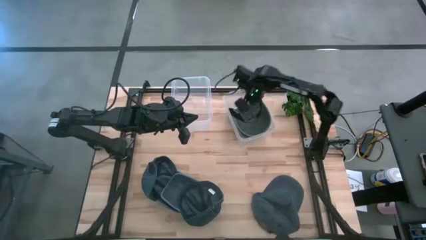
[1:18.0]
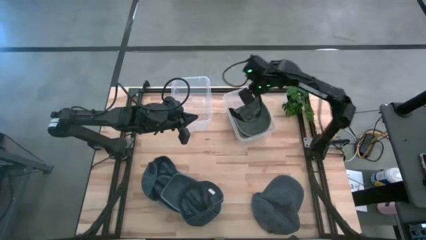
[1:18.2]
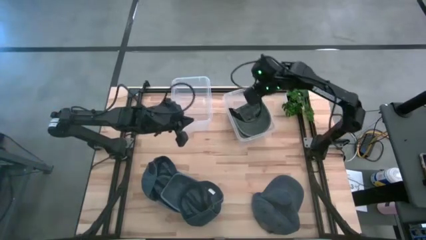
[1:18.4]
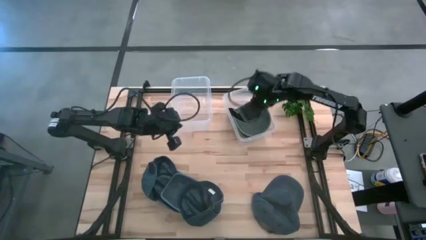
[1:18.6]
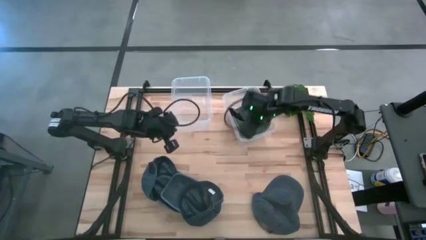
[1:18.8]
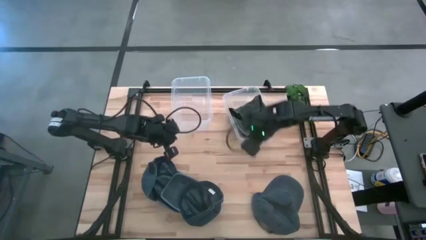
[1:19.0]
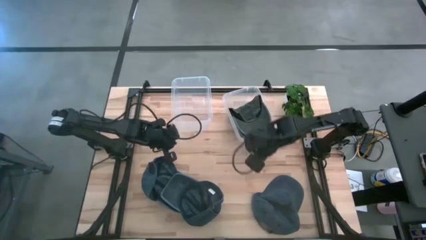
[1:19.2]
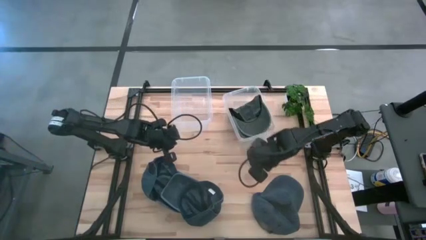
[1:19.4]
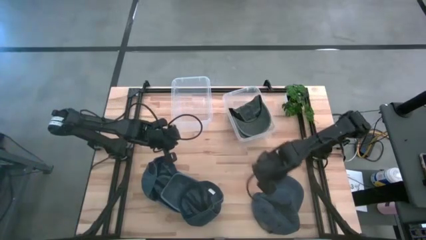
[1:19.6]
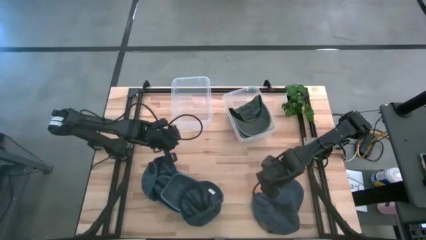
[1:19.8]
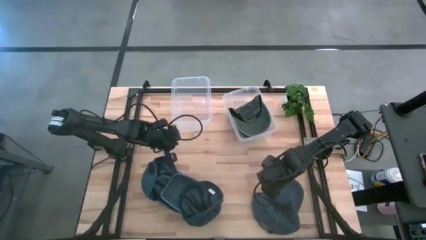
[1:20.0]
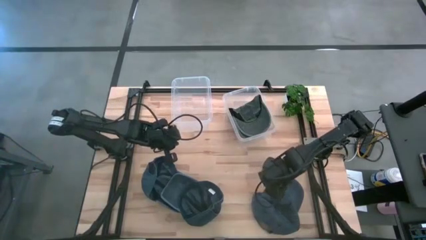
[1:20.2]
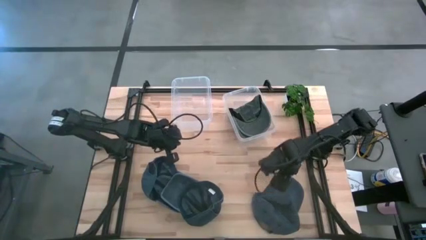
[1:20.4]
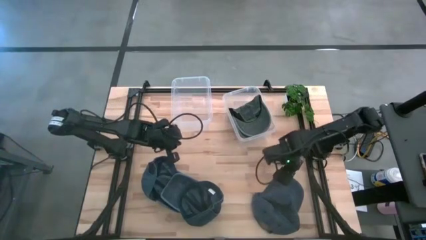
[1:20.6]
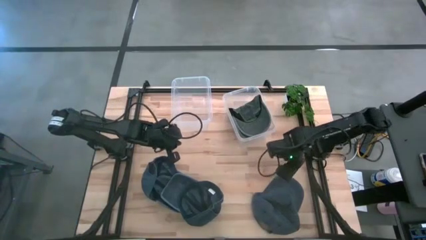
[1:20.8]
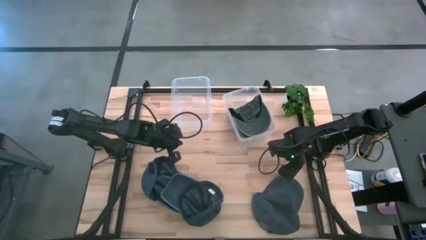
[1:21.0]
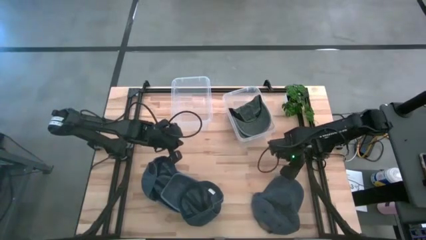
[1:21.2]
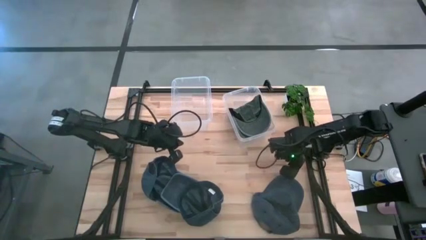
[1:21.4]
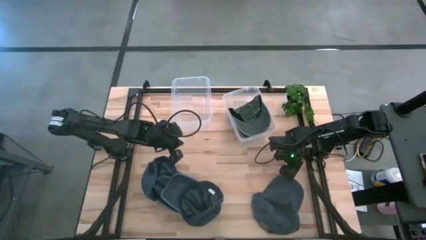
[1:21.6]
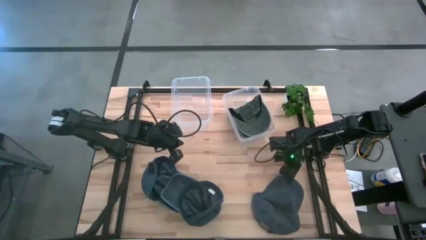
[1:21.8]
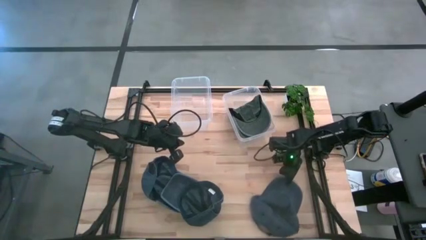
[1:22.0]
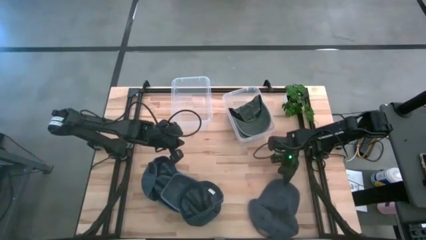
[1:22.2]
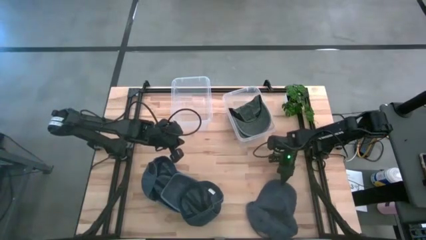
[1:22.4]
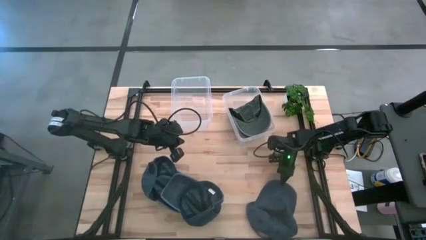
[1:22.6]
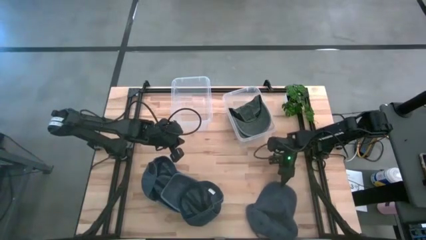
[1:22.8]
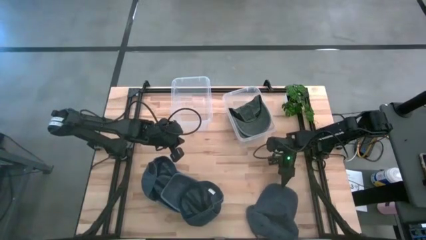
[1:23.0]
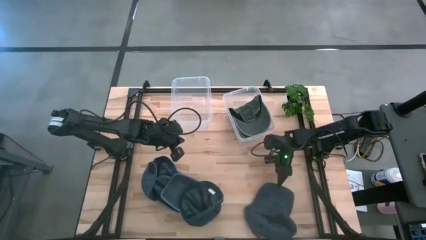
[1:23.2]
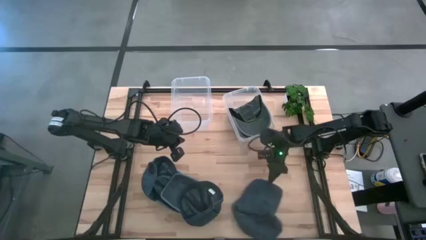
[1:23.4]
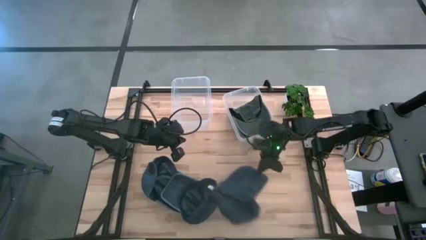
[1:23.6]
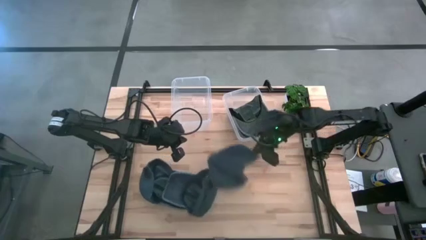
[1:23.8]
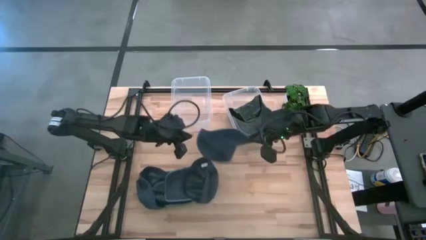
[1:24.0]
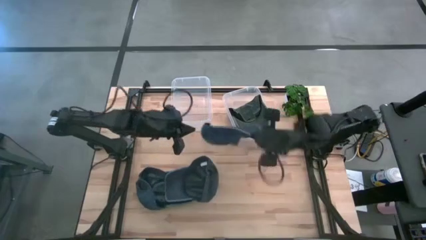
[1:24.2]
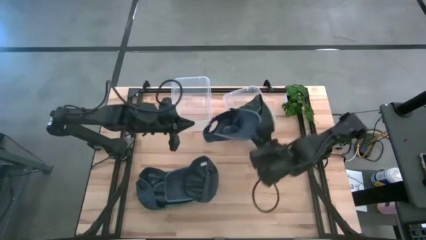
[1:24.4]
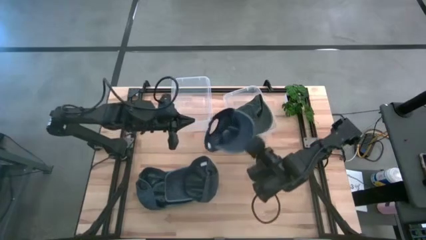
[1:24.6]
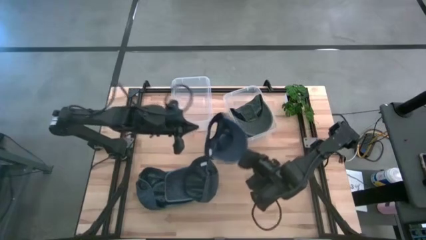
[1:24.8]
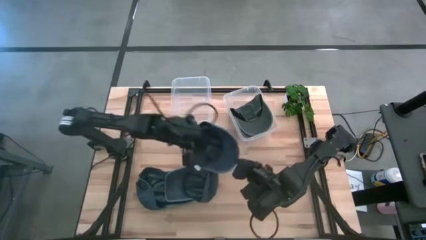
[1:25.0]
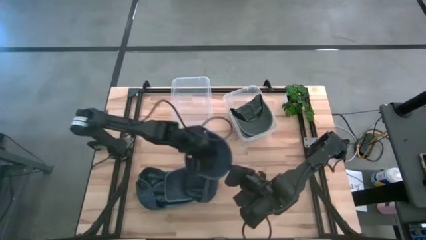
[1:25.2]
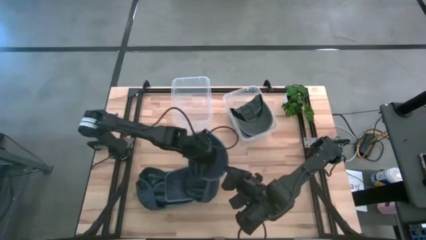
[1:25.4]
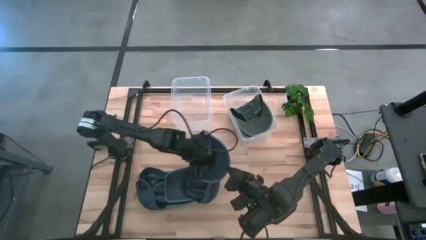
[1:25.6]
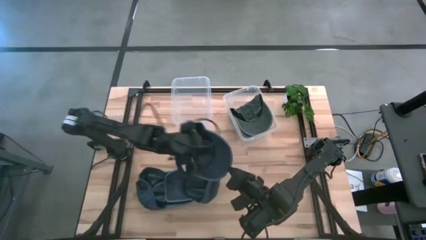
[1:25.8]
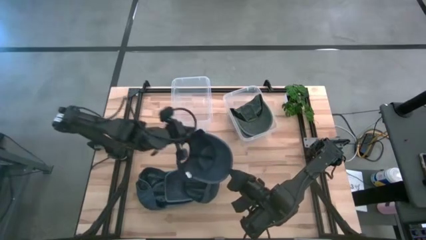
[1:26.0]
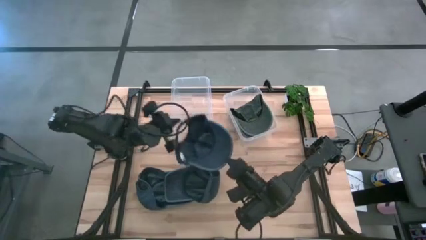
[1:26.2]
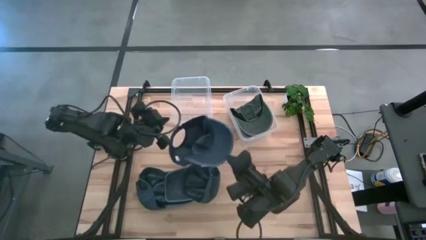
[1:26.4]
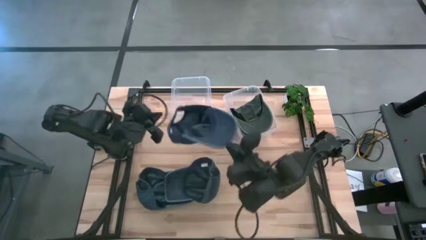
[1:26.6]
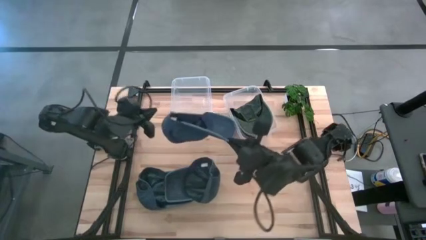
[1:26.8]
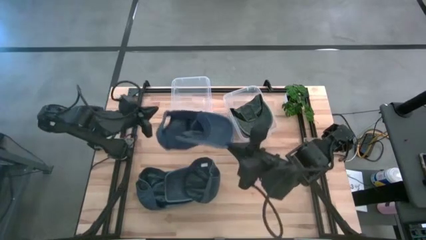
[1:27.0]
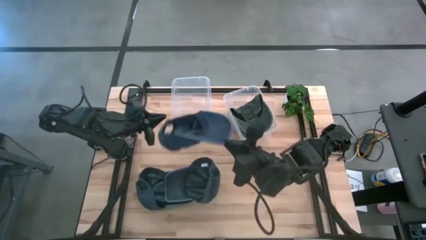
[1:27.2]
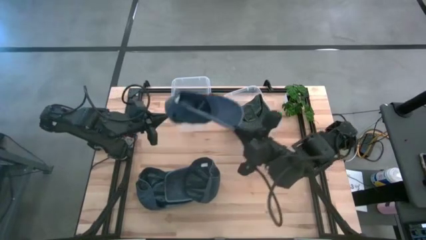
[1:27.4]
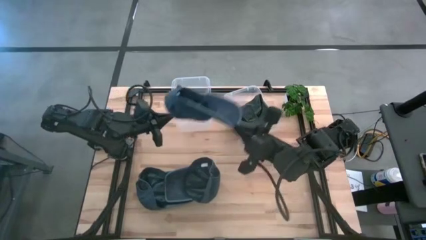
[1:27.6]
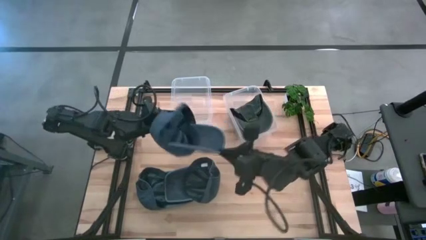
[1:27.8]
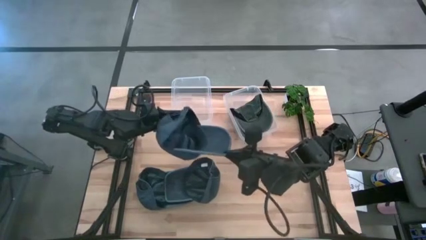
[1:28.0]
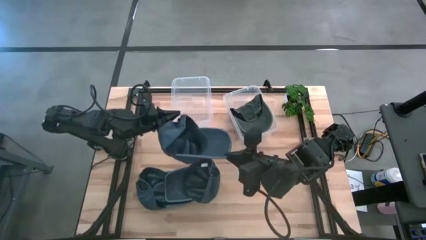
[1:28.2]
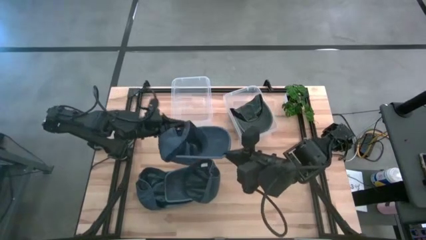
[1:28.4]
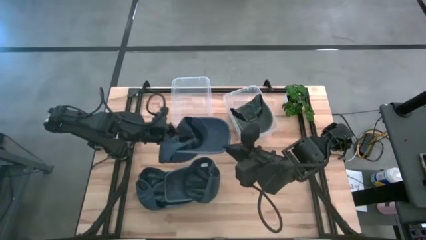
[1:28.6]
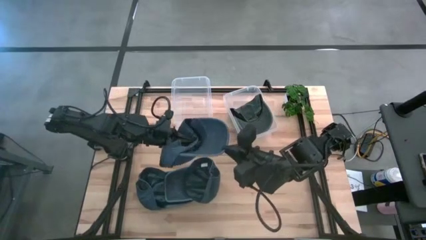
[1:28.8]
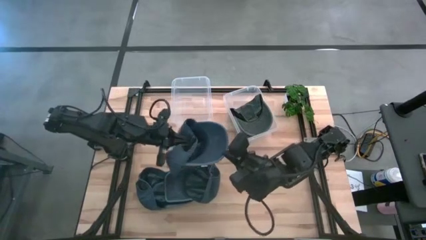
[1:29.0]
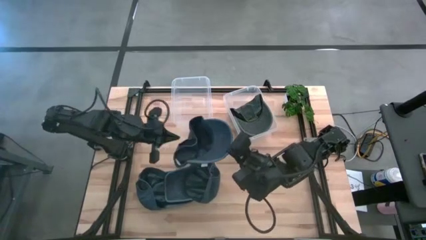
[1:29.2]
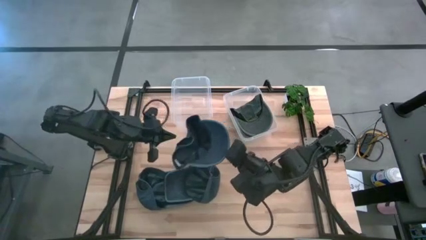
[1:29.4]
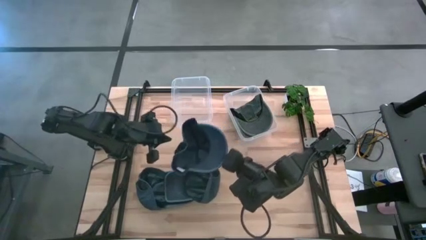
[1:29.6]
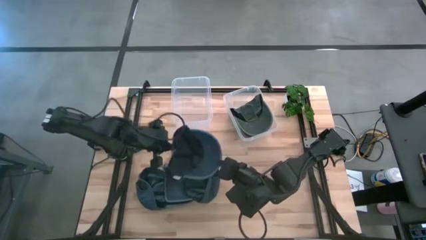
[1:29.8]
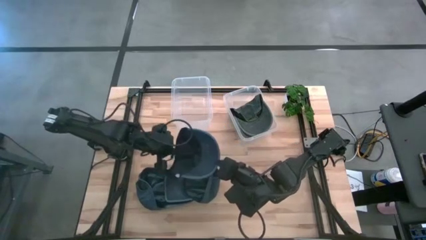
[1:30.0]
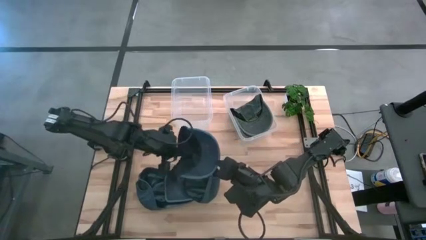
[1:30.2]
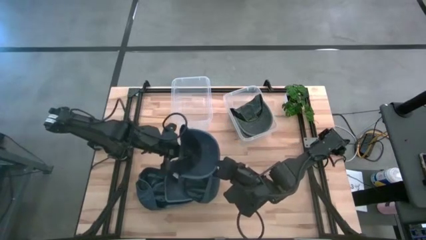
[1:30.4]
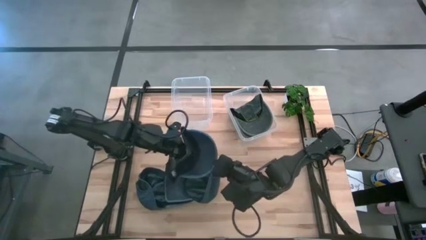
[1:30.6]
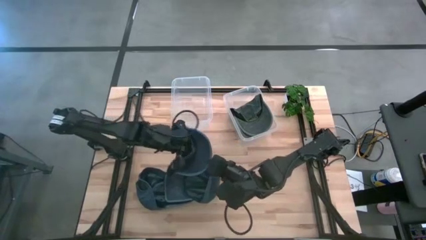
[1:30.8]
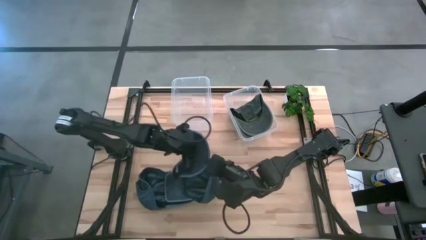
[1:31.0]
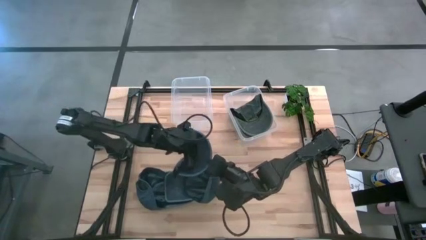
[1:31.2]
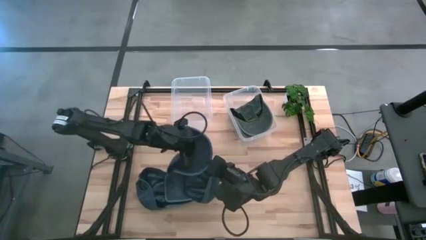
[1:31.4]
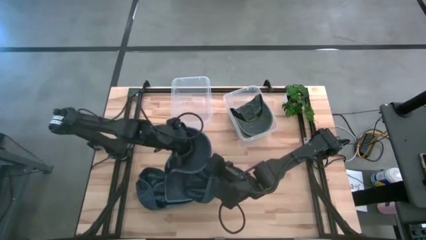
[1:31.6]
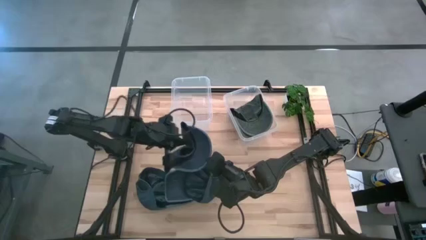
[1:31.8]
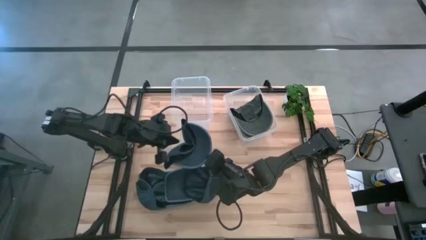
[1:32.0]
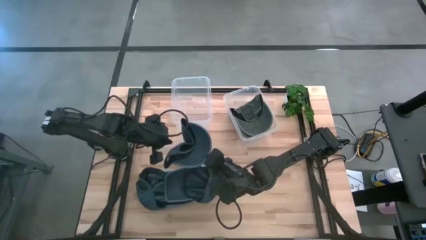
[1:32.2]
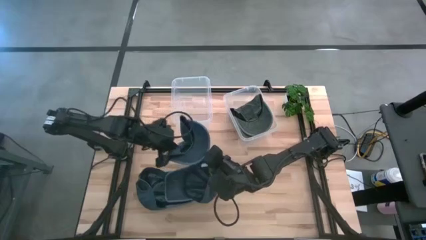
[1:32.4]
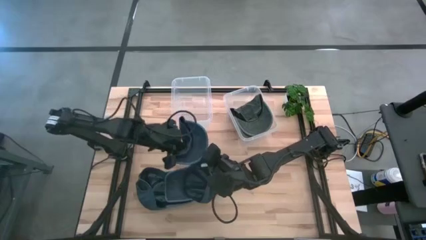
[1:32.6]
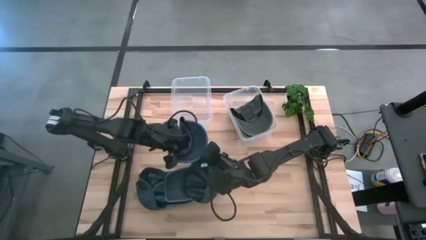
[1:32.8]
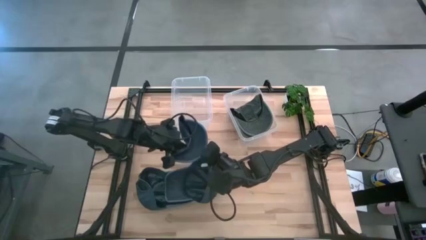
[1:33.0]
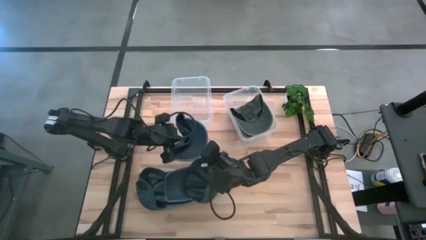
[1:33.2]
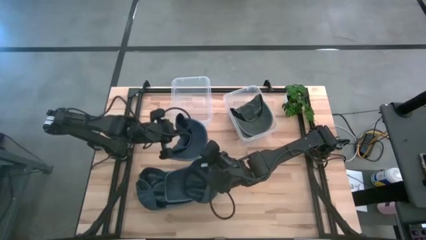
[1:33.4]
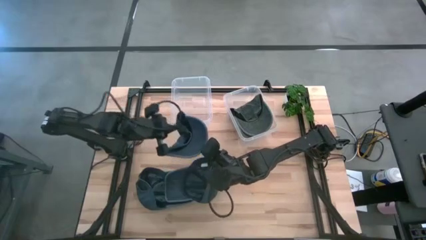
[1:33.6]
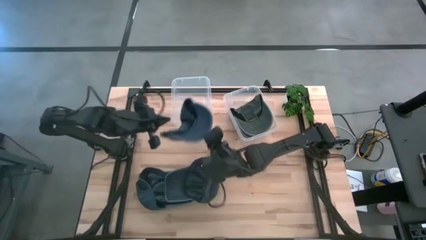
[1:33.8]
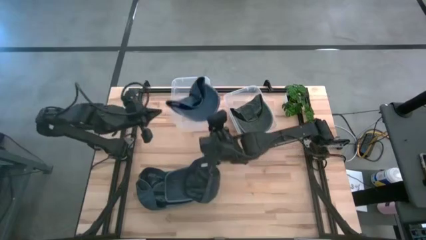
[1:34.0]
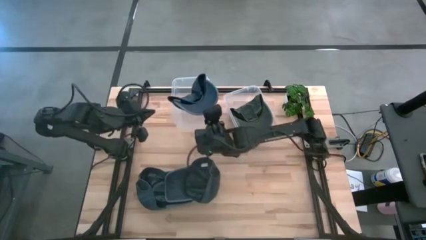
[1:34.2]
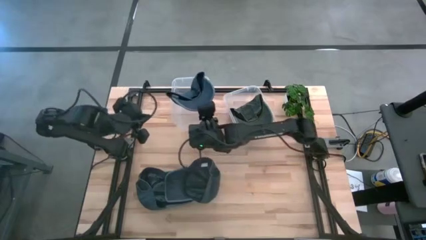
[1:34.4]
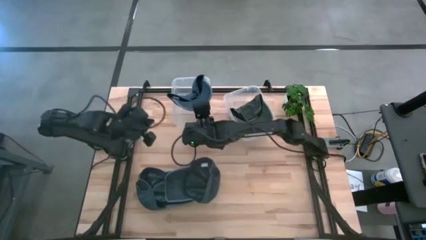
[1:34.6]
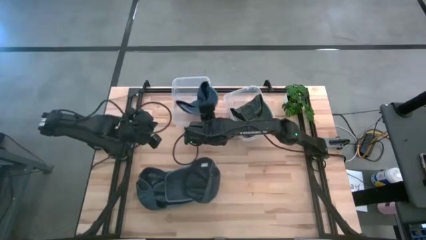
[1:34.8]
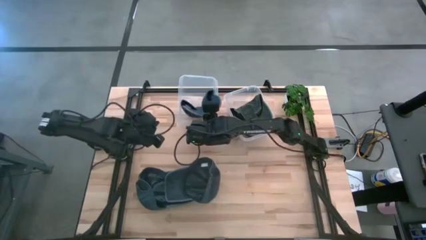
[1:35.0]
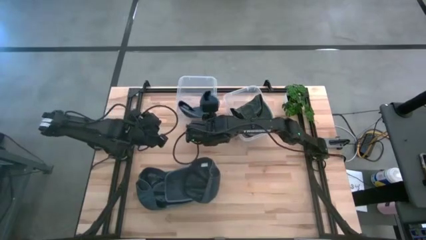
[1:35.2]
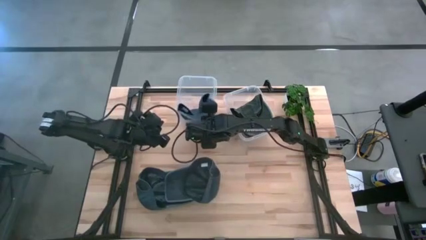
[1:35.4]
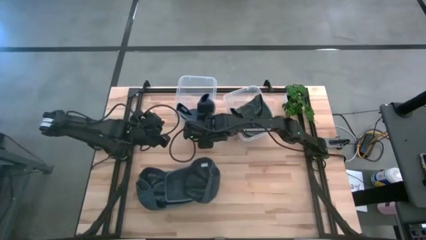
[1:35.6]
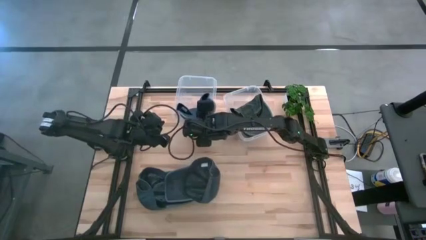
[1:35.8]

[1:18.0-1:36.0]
Task: Pick & Place hat
Put the right blue cap into the left bin
